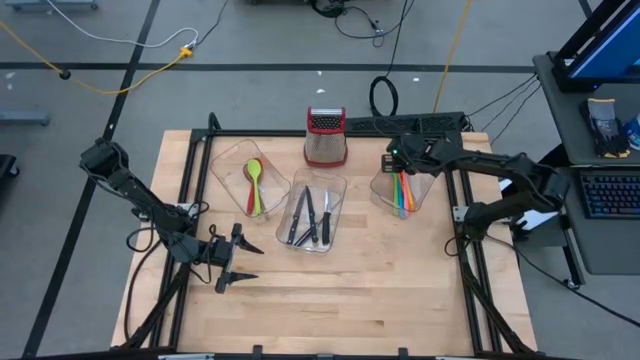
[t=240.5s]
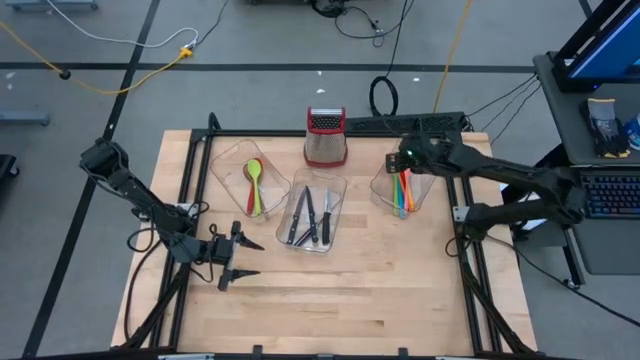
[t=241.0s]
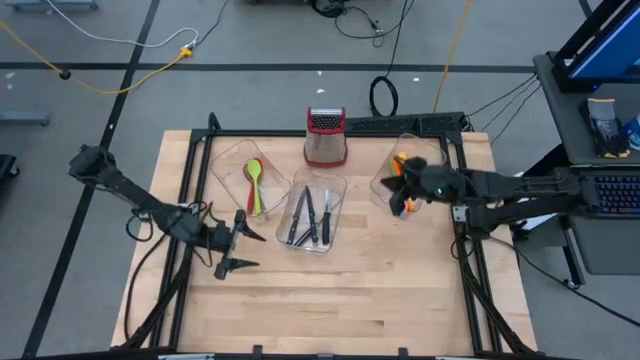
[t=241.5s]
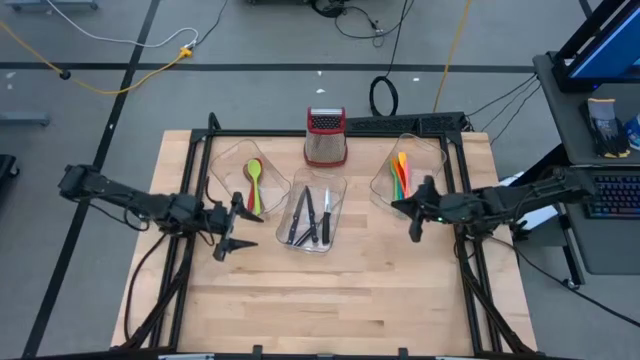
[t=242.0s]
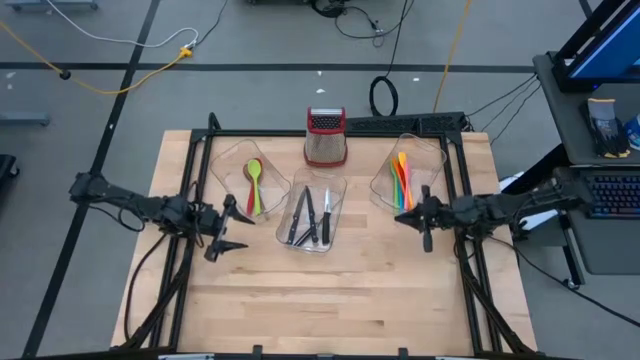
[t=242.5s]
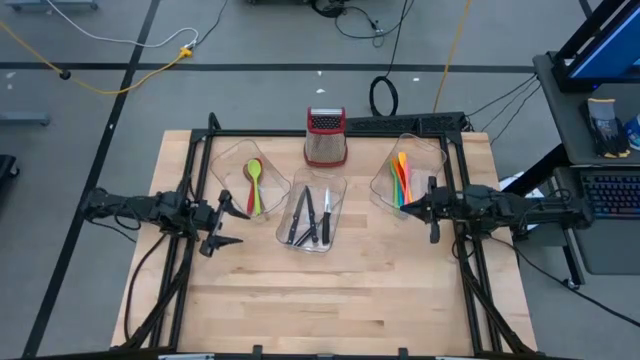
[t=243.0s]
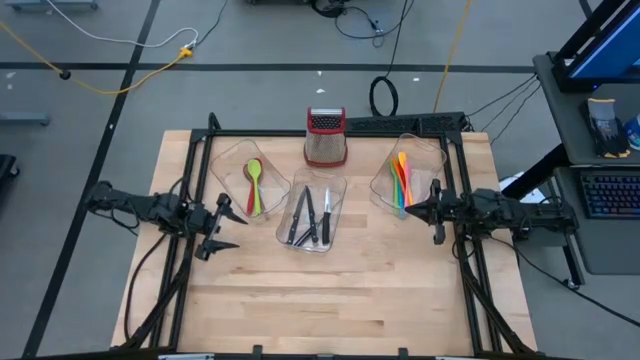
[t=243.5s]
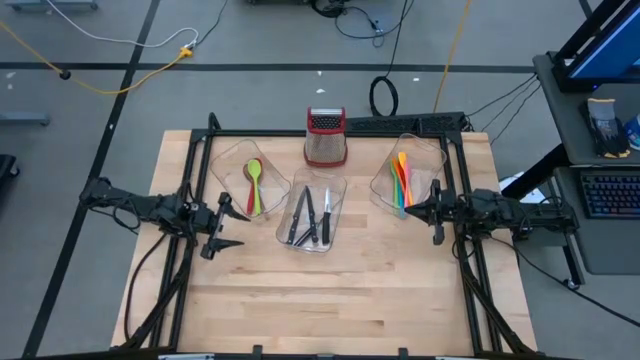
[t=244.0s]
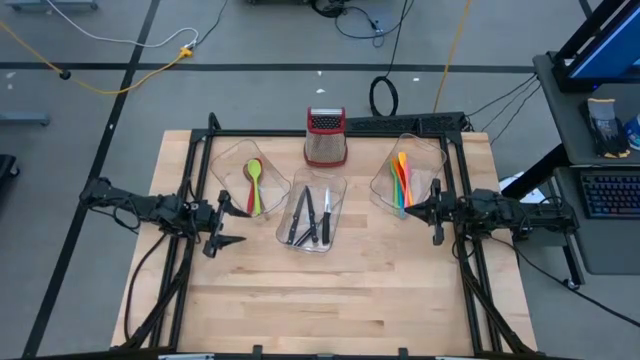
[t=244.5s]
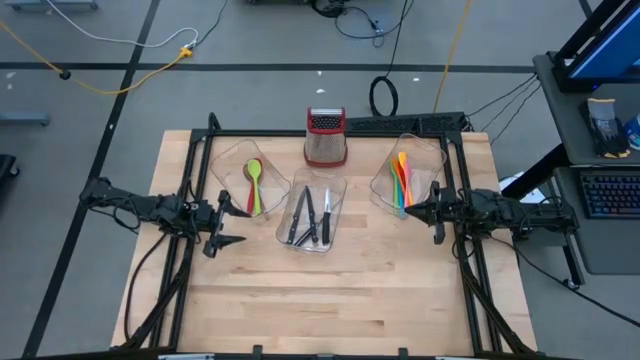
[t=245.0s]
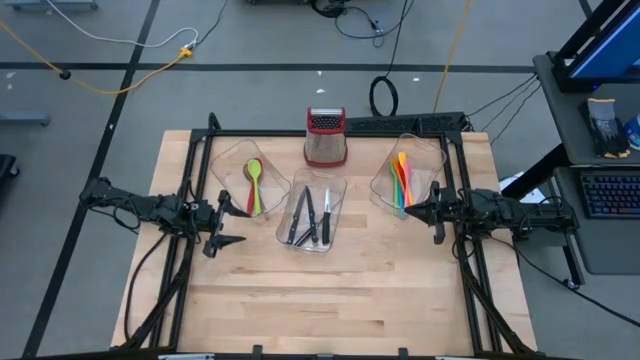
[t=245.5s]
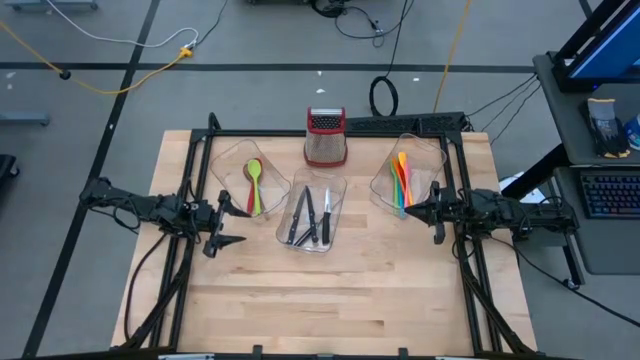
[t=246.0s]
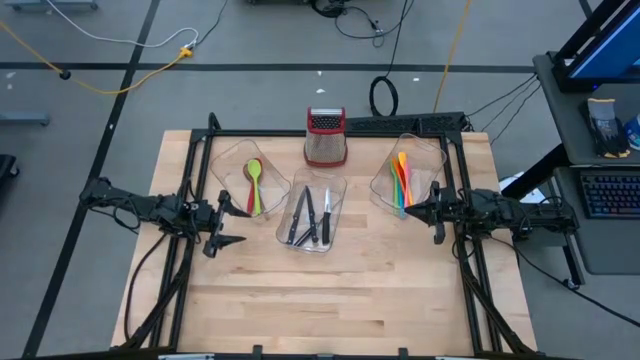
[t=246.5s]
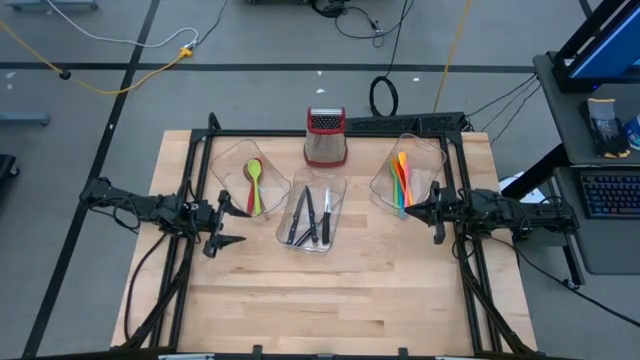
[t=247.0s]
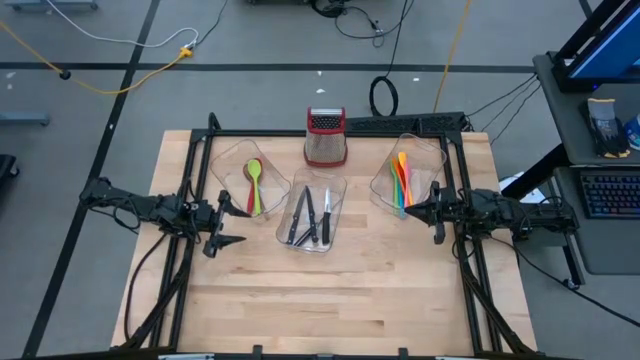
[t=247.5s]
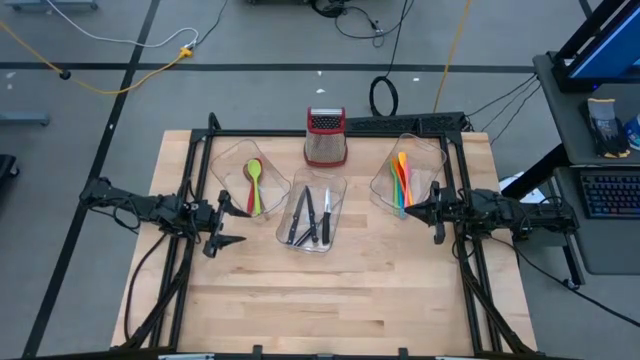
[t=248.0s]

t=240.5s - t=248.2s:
Task: Pick & Place Kitchen Items
Return to Home Position

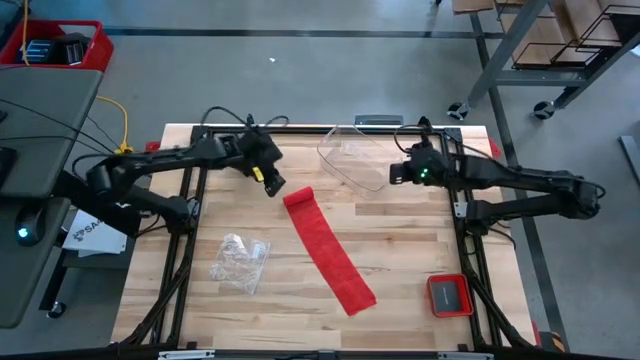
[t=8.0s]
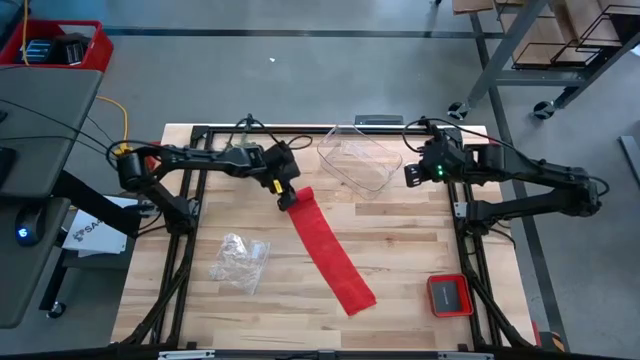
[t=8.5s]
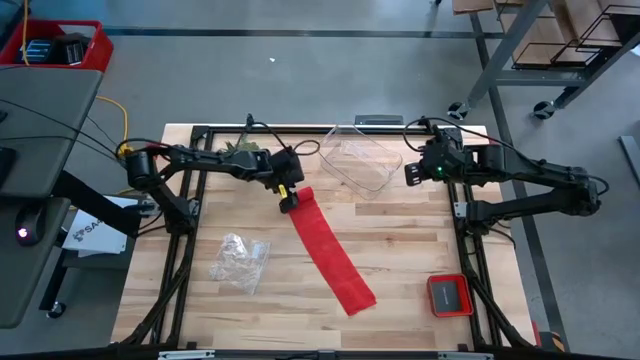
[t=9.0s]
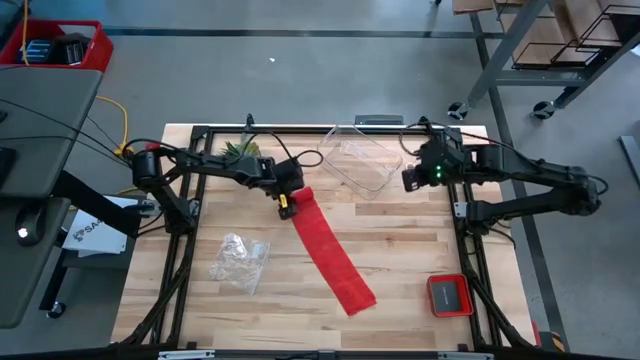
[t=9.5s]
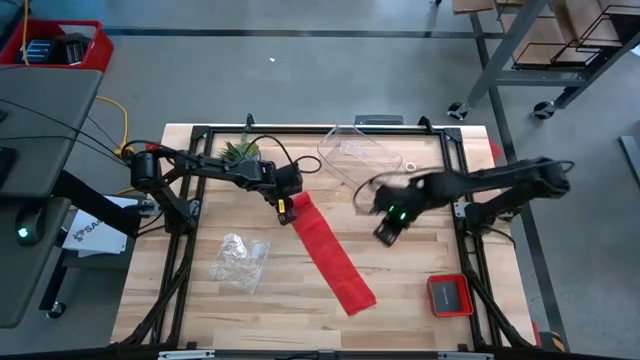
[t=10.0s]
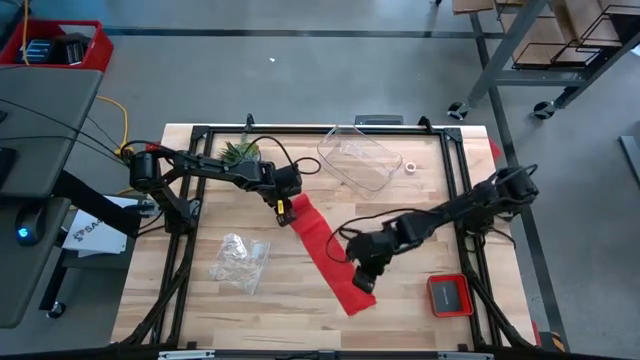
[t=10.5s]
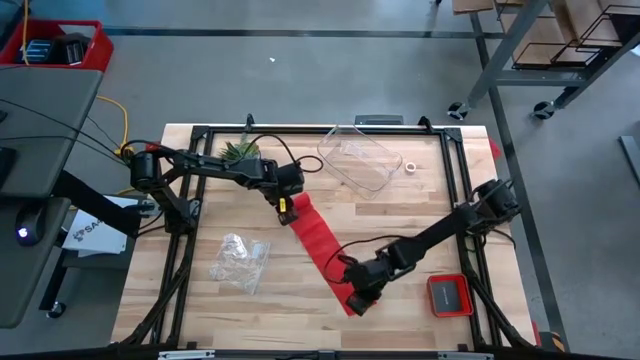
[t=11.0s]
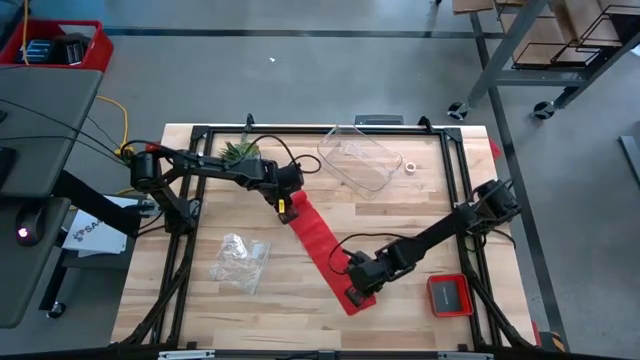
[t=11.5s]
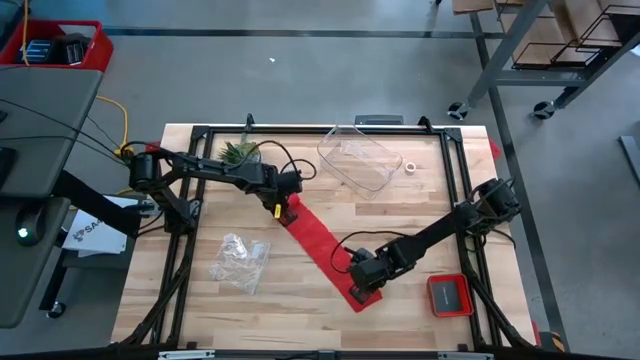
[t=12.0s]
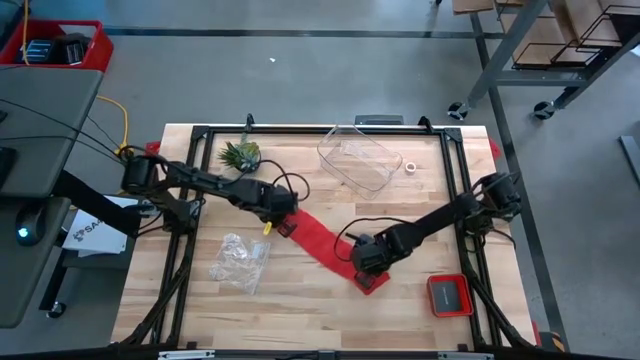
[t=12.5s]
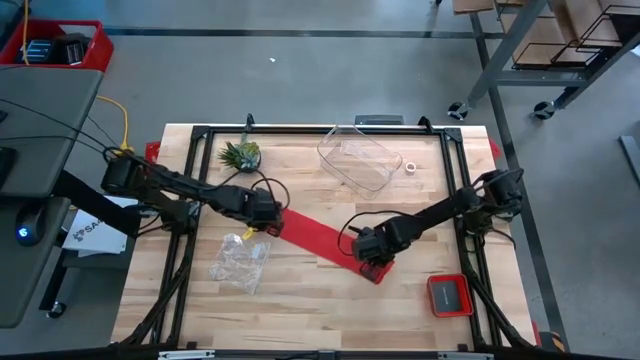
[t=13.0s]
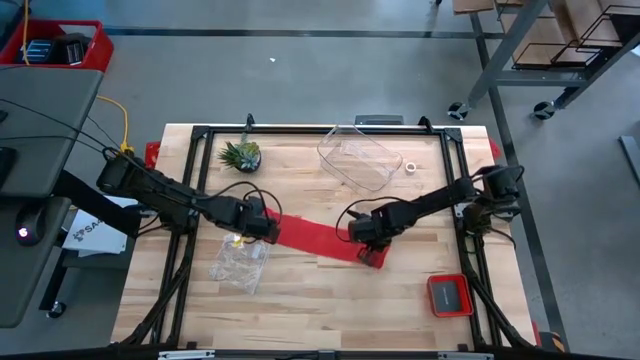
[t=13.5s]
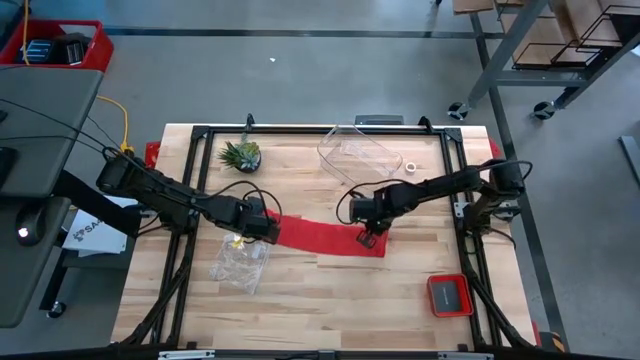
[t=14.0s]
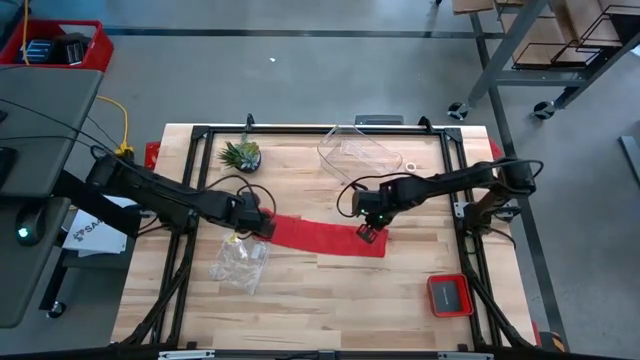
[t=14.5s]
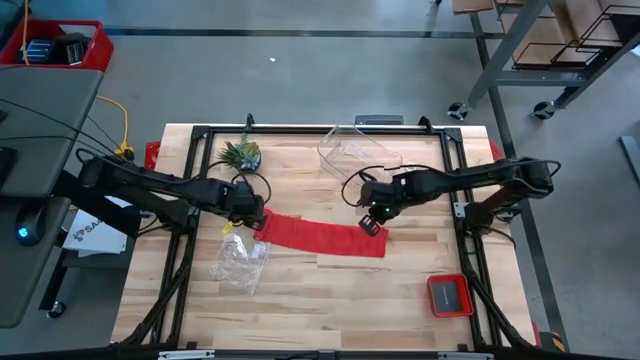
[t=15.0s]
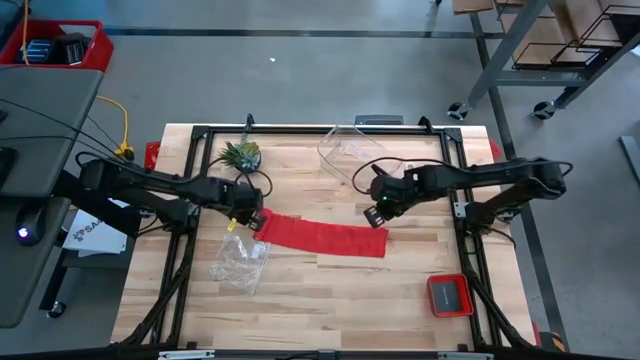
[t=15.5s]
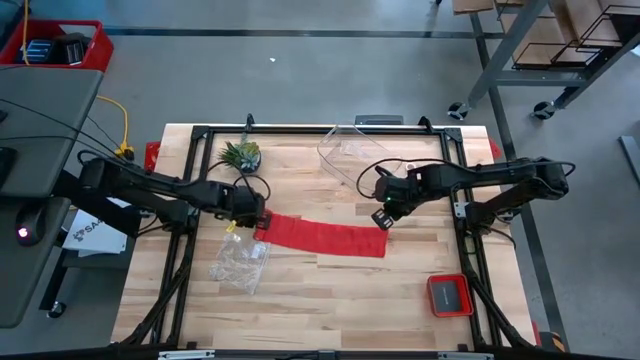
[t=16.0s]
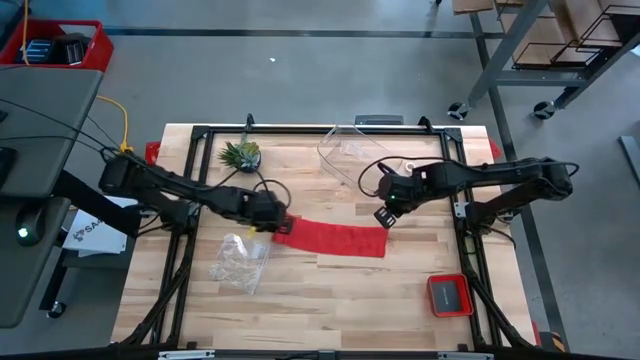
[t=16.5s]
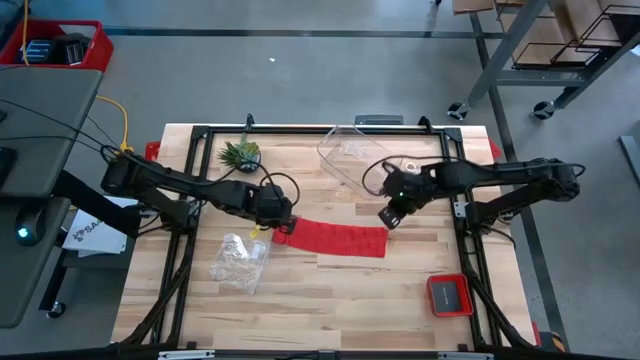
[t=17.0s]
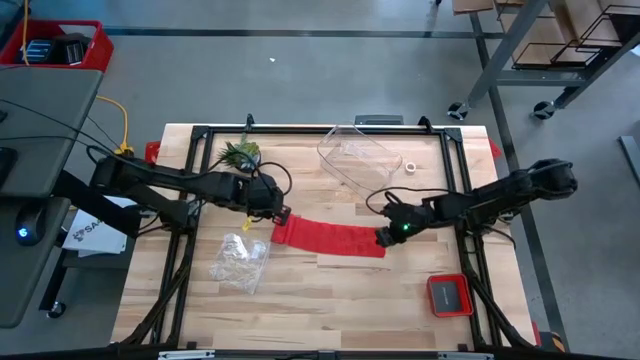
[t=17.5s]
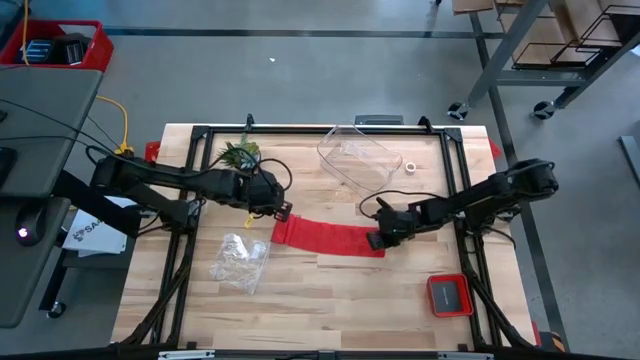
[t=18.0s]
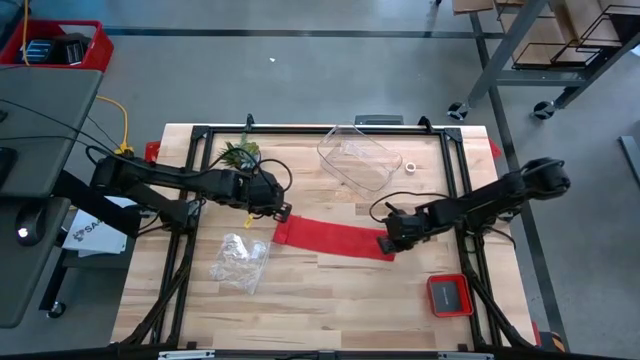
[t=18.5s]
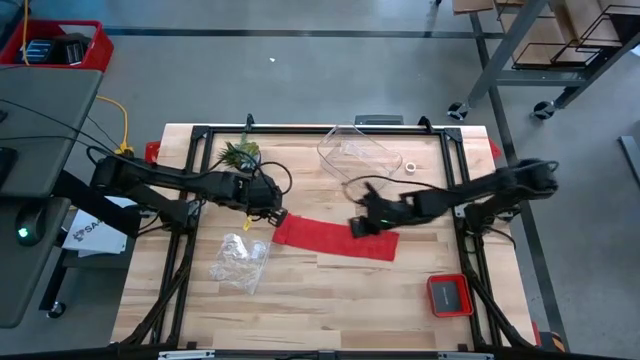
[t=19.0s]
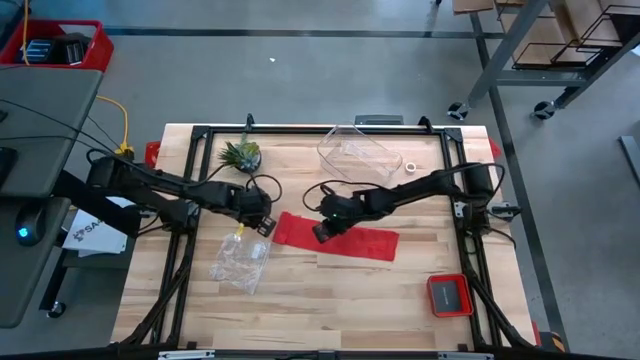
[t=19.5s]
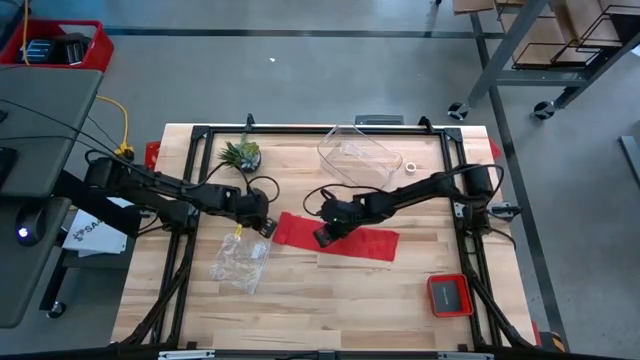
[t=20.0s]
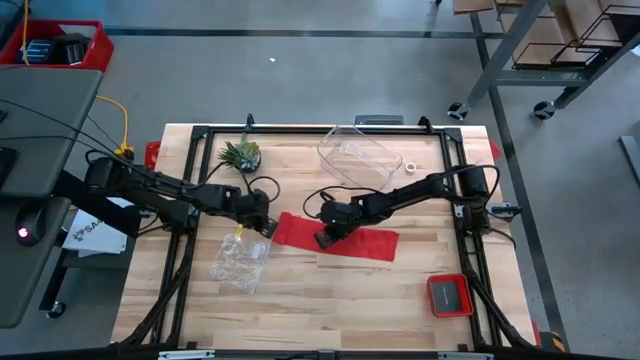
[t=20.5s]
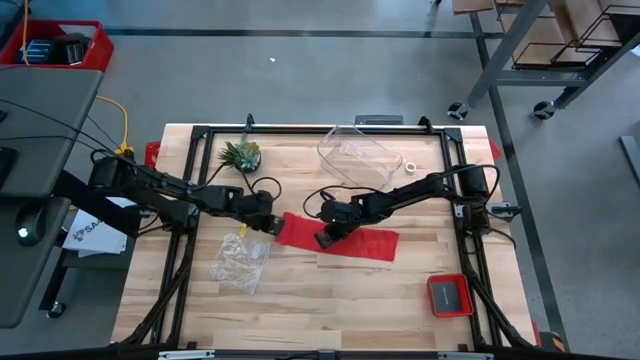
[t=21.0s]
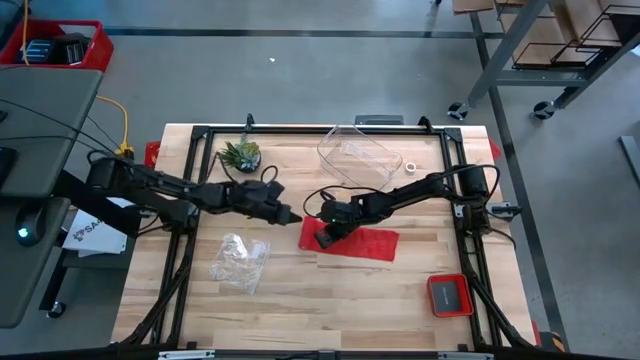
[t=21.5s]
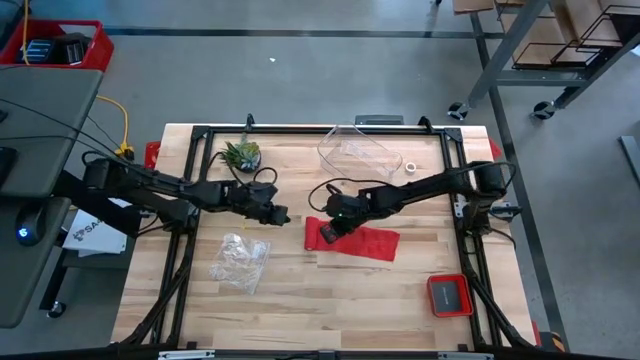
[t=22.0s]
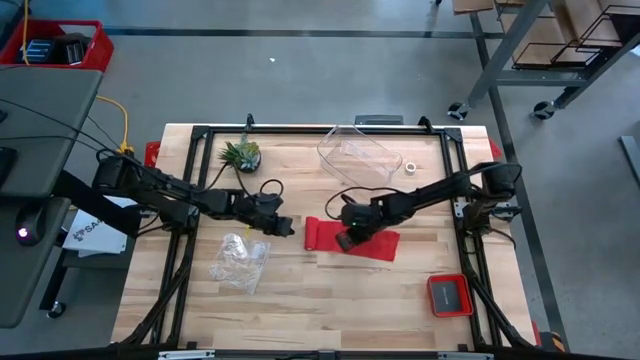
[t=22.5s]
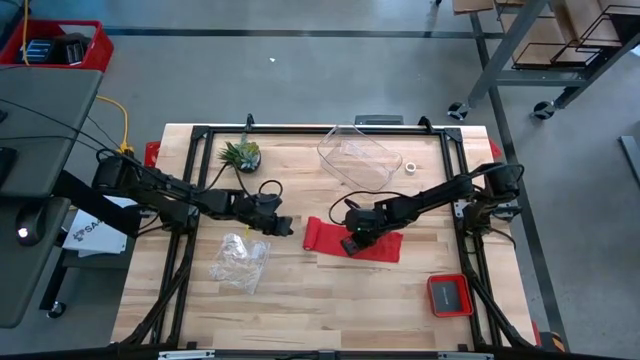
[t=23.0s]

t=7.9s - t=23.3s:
Task: Roll bandage
Roll the red bandage
